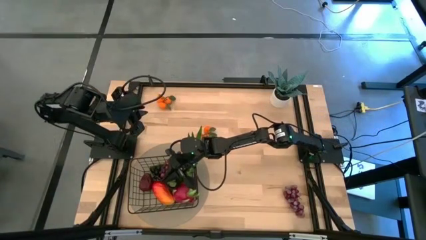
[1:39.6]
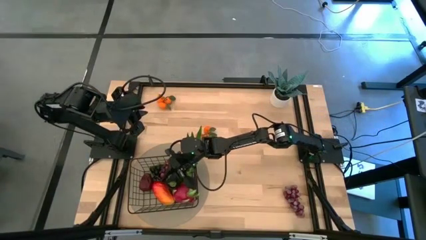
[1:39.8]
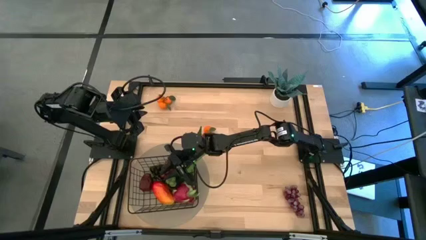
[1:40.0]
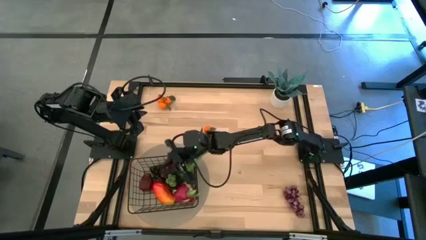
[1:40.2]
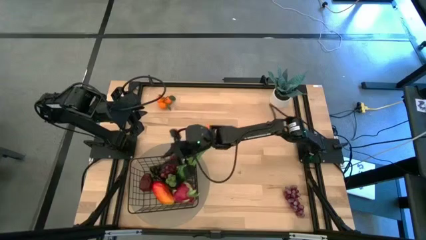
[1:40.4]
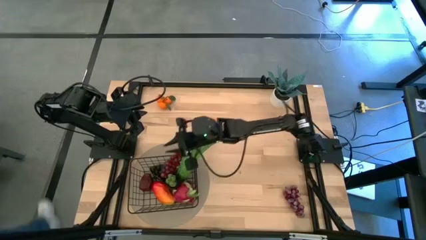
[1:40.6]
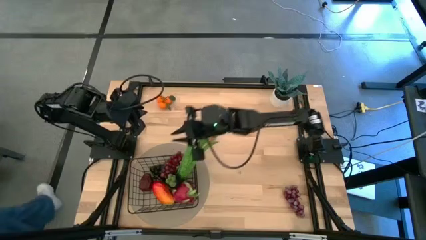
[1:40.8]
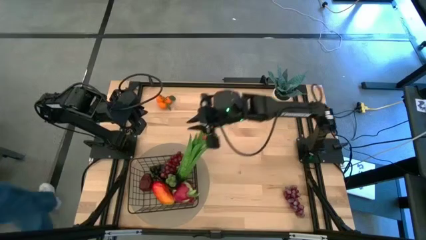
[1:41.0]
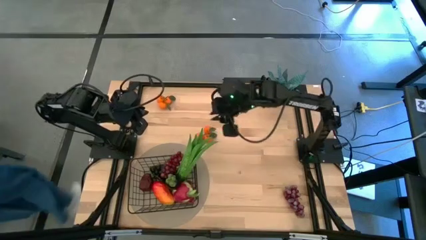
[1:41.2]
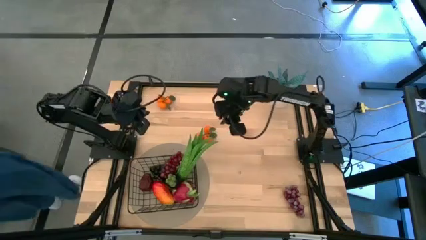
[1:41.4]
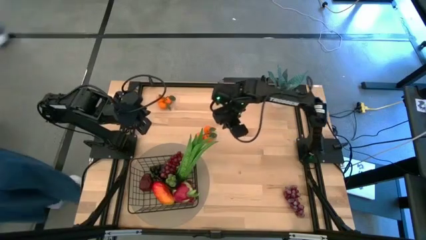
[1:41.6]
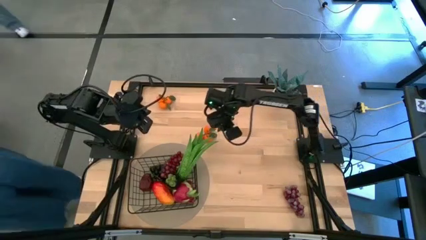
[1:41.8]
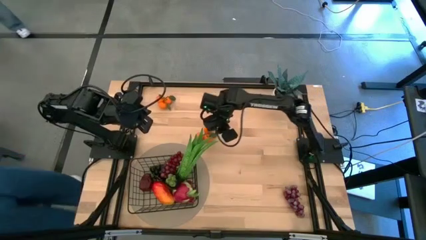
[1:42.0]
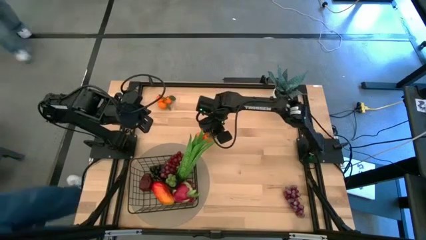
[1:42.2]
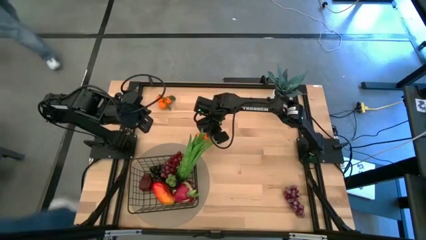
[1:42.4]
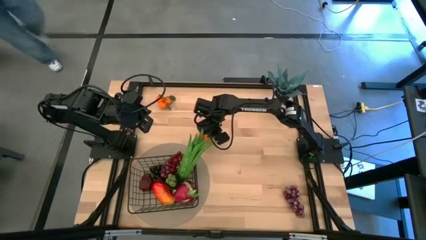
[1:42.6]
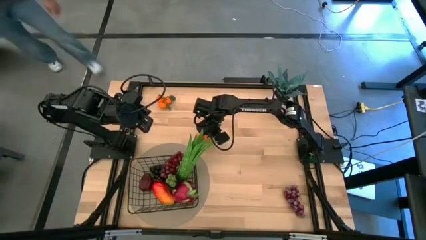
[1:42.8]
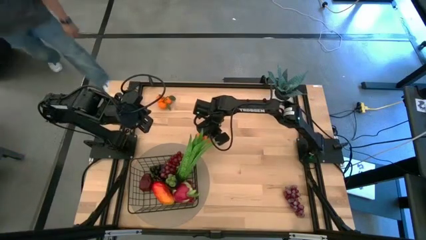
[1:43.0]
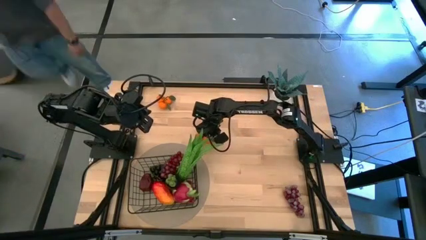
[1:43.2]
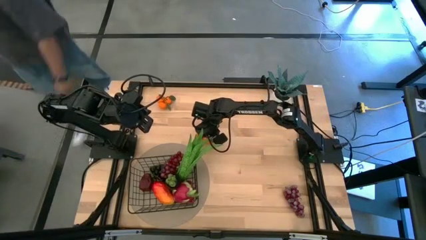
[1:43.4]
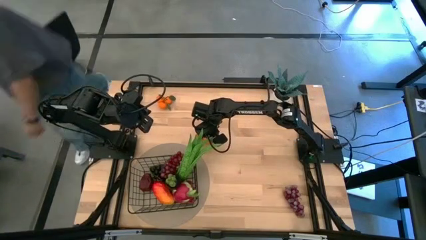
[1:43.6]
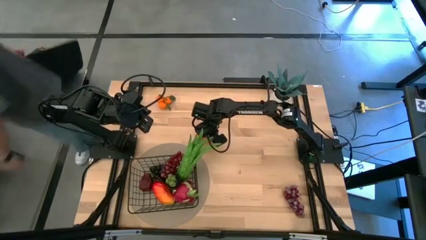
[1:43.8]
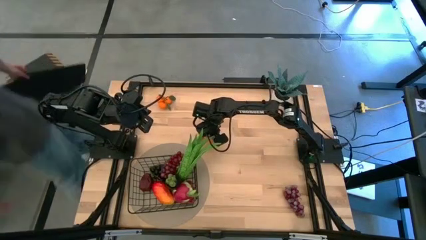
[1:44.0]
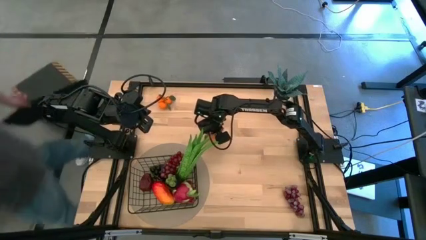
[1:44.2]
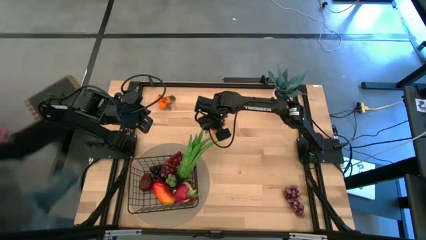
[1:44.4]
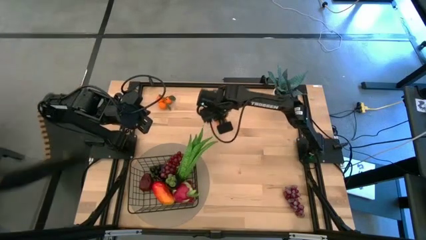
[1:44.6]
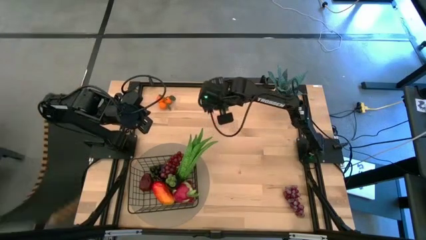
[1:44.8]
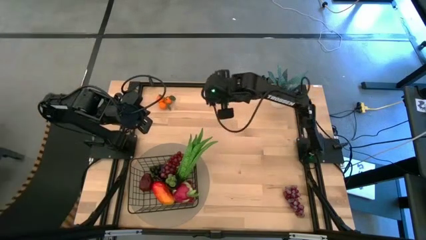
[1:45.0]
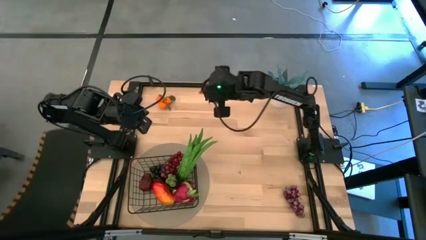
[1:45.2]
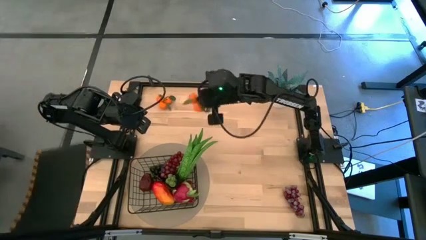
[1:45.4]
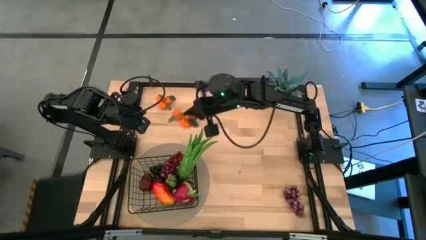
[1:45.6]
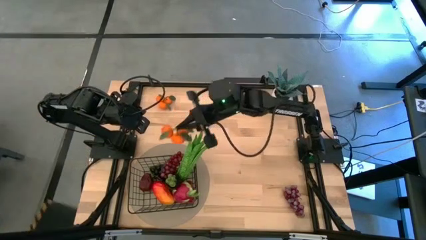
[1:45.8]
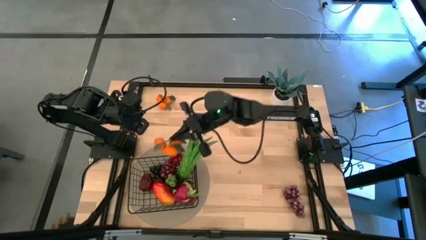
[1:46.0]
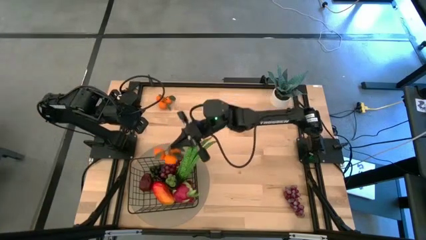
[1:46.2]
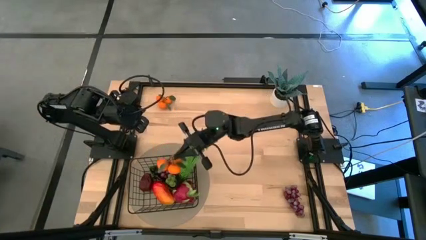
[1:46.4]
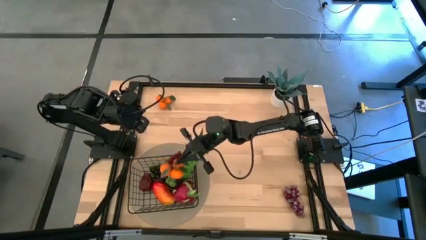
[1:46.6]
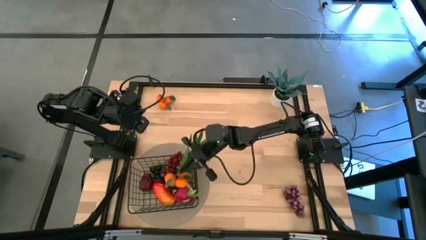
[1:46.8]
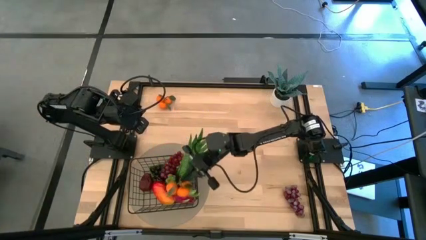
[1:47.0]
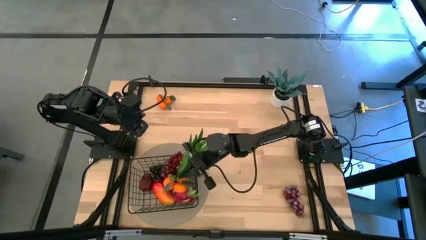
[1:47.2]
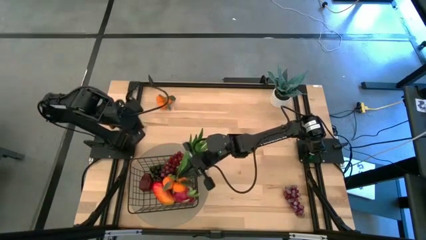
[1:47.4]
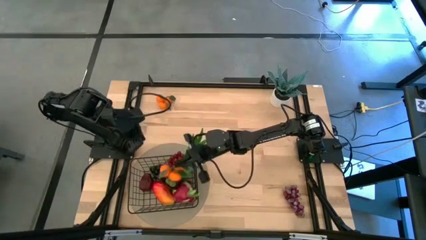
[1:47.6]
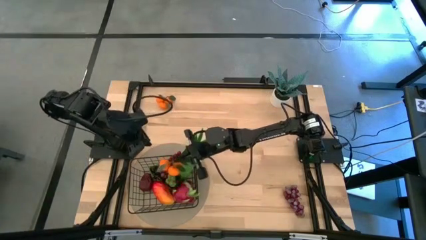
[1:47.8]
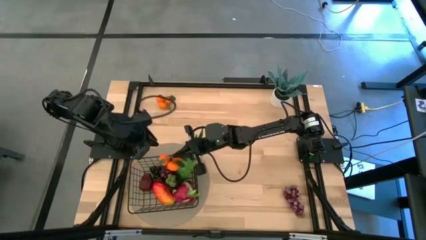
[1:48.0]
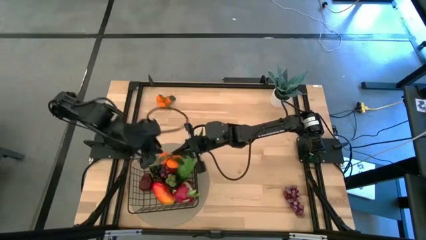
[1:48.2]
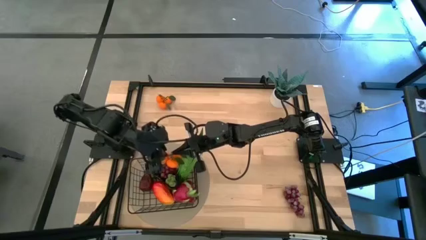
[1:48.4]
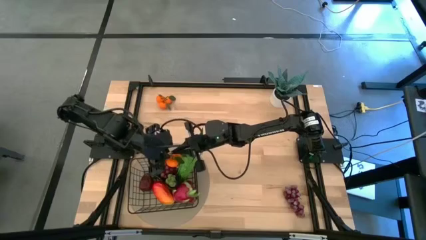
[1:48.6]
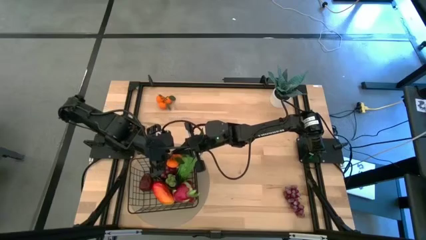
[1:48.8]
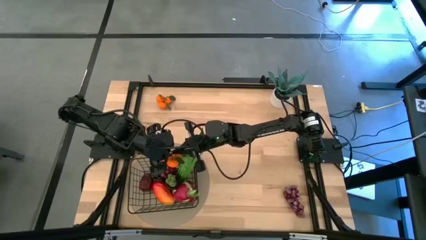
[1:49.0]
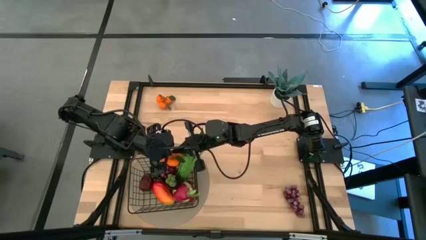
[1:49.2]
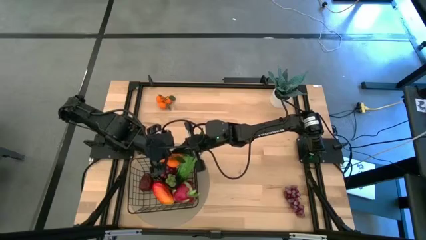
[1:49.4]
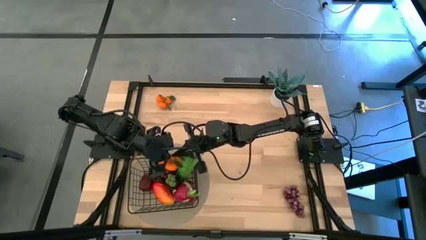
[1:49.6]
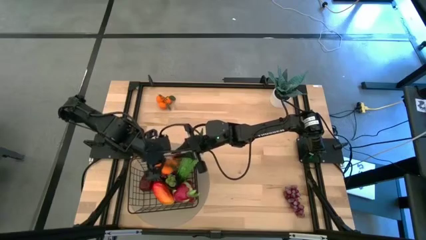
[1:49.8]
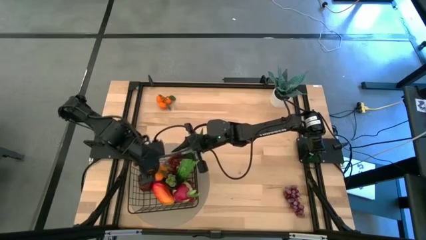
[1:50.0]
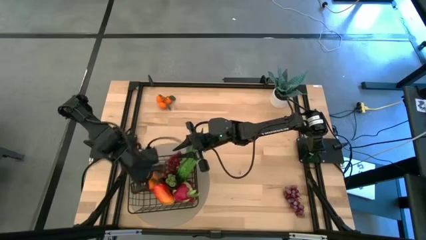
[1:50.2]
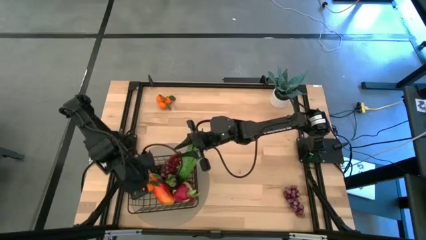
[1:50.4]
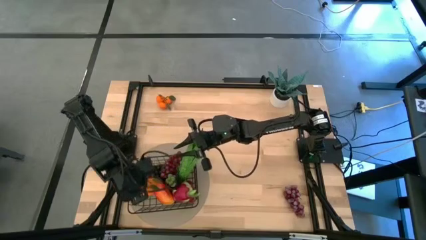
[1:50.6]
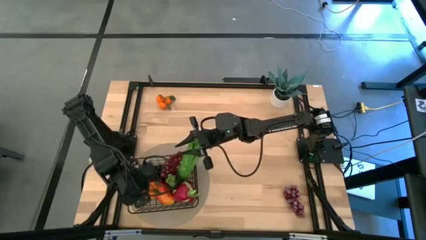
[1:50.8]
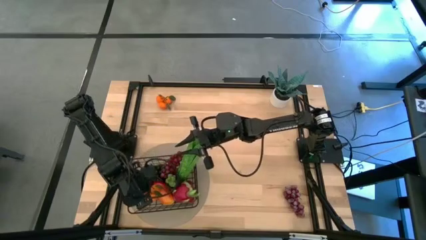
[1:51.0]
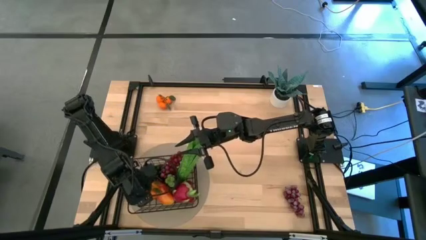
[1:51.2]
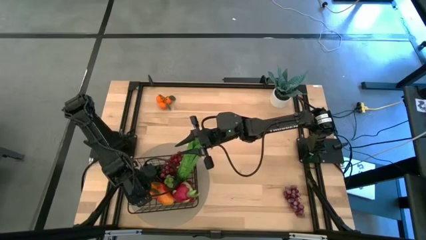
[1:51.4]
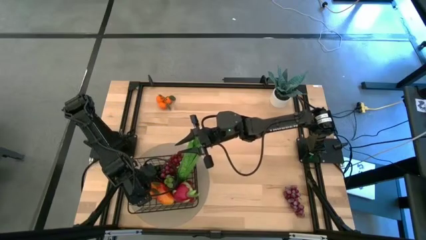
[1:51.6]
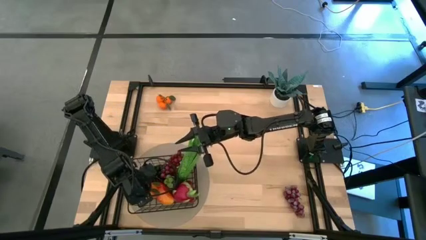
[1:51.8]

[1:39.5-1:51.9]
Task: Build produce basket
Put the orange tangerine into the black wire basket

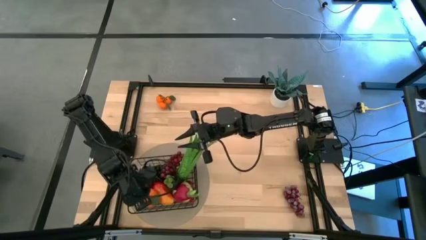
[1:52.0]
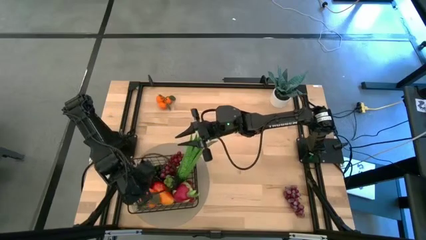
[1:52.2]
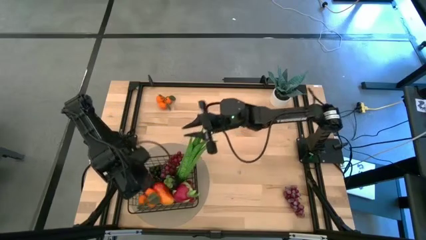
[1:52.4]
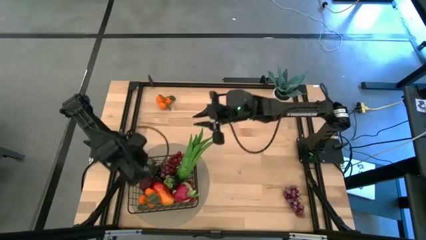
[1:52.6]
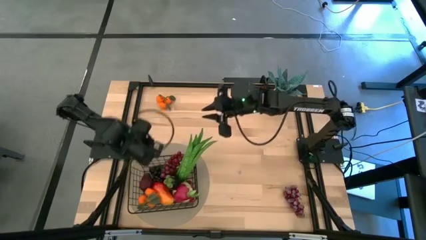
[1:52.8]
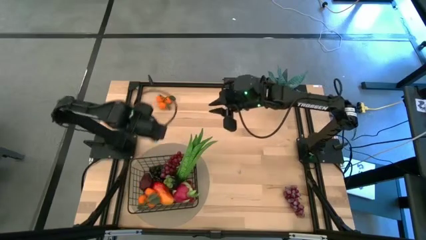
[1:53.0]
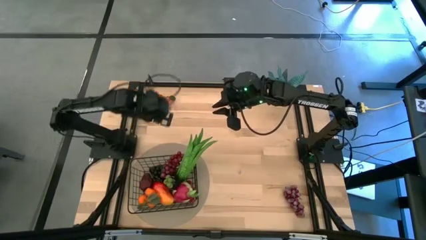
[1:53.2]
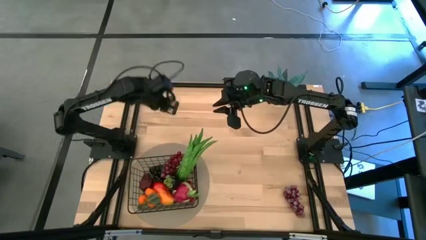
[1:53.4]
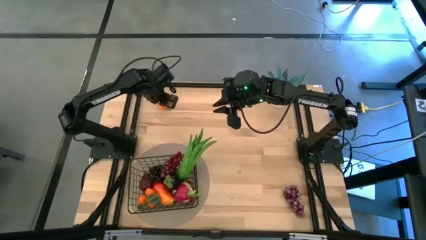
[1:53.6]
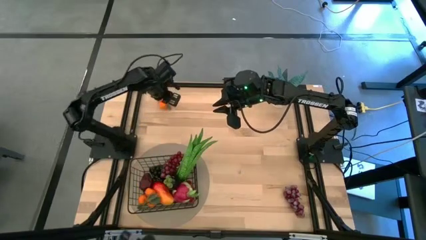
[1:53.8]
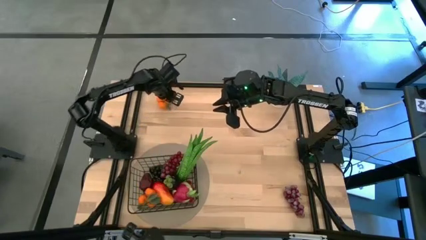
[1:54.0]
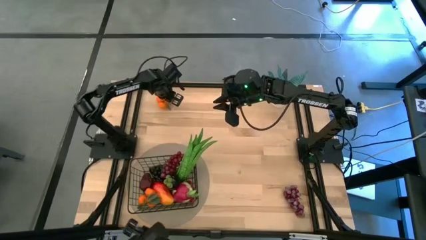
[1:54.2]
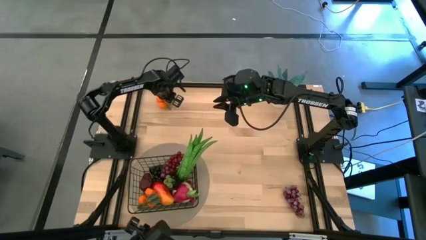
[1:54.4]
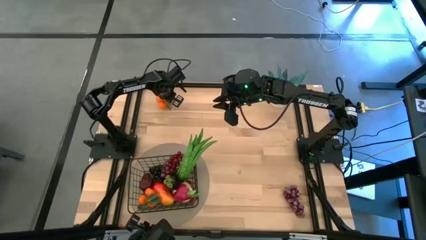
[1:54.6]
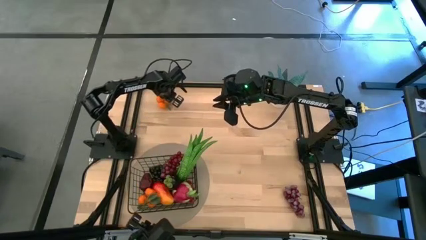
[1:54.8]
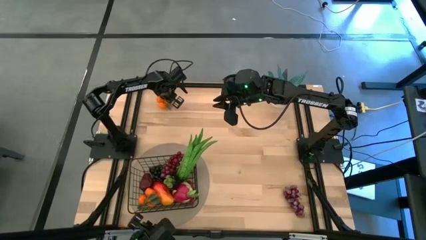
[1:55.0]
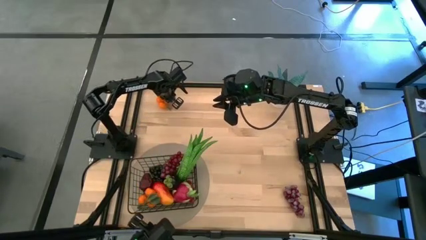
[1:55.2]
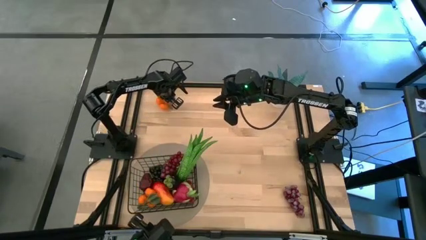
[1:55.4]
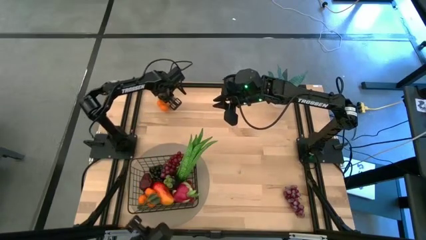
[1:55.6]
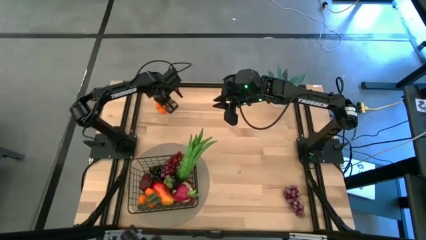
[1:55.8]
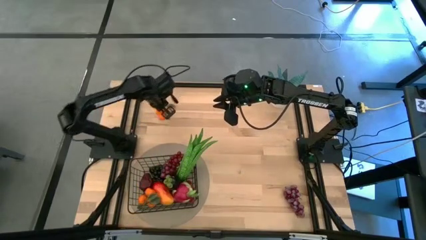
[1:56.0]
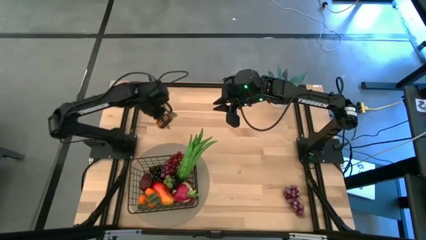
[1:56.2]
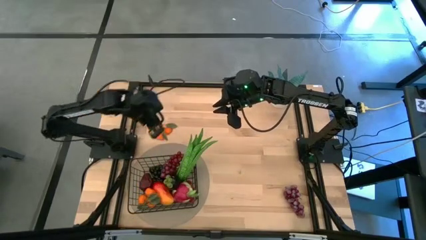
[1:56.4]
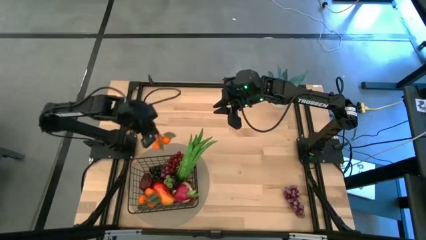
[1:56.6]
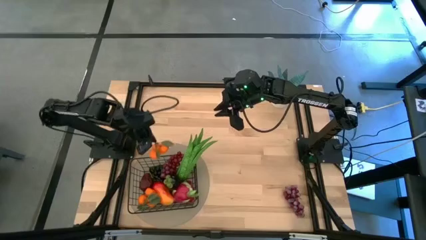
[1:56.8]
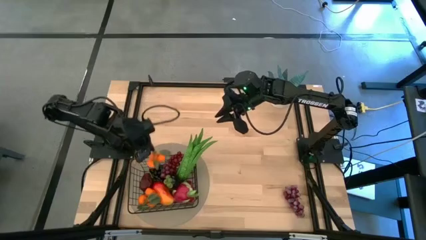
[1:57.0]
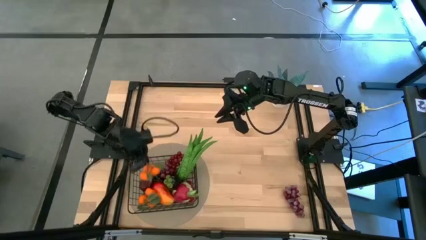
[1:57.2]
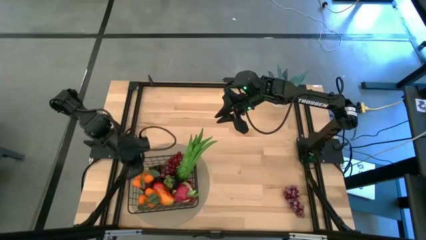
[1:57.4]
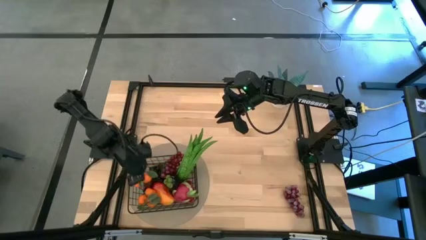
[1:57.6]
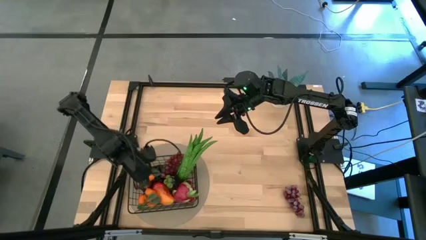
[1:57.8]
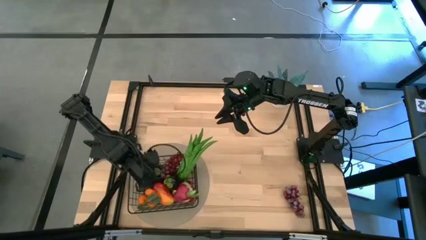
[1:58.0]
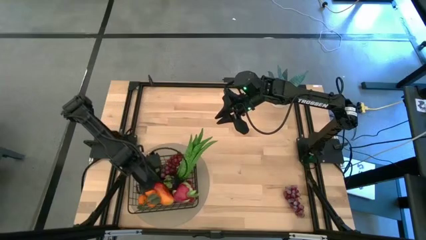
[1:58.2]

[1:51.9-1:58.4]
Put the orange tangerine into the black wire basket
